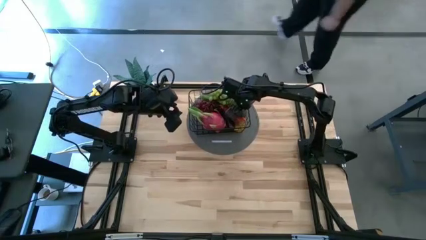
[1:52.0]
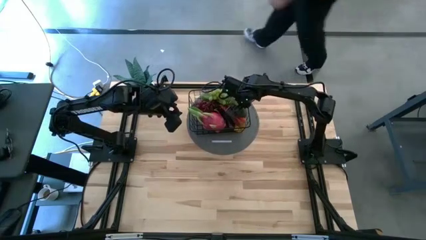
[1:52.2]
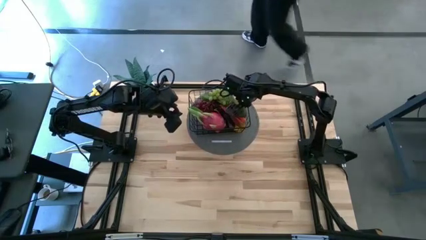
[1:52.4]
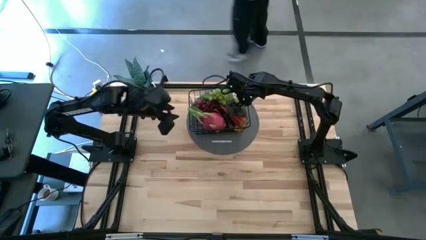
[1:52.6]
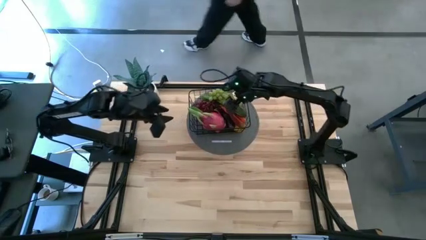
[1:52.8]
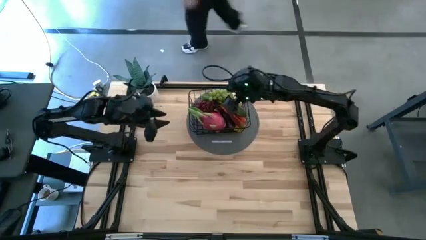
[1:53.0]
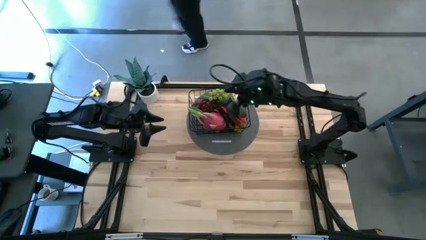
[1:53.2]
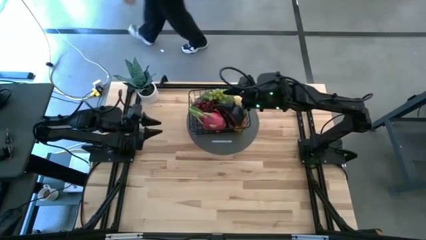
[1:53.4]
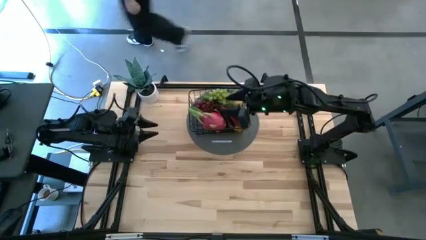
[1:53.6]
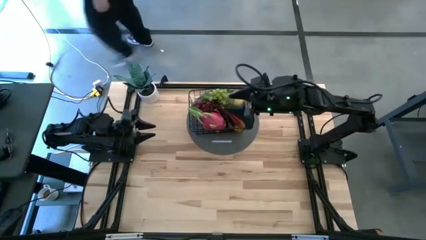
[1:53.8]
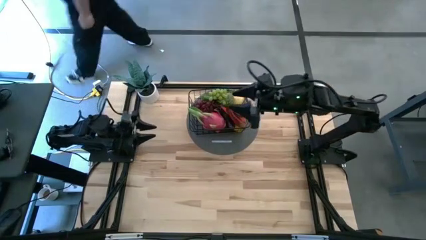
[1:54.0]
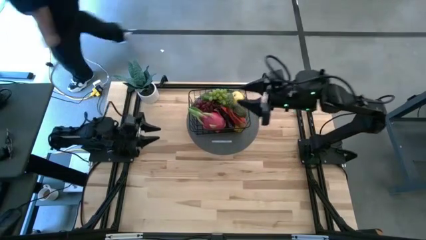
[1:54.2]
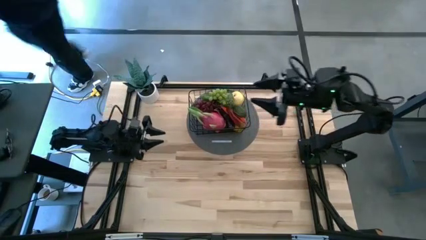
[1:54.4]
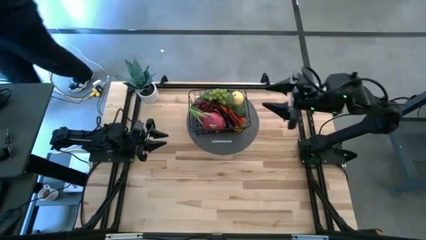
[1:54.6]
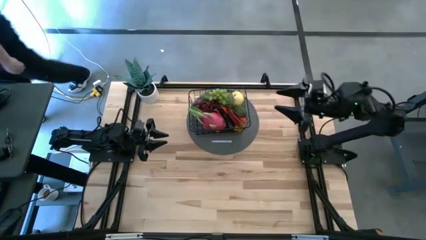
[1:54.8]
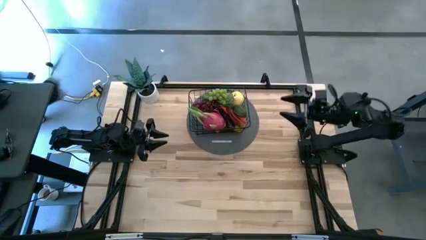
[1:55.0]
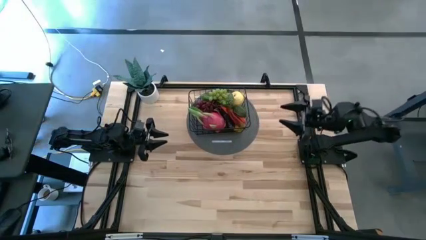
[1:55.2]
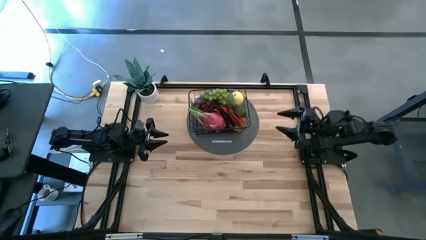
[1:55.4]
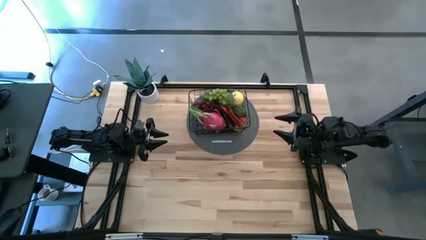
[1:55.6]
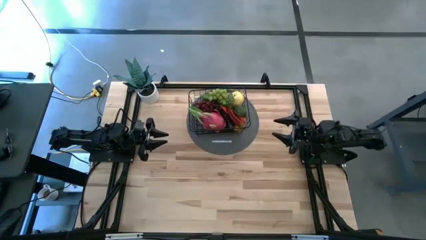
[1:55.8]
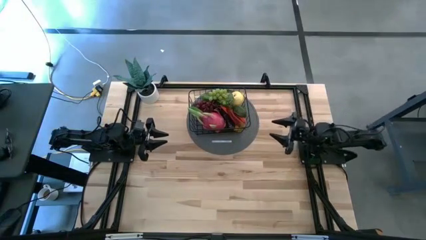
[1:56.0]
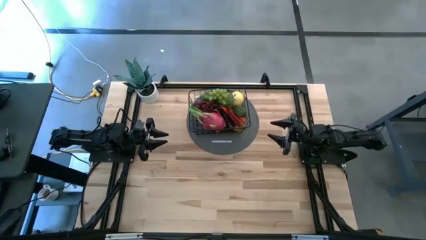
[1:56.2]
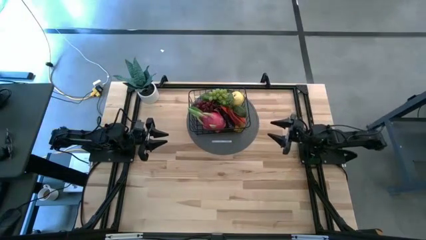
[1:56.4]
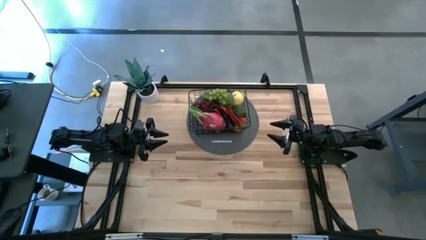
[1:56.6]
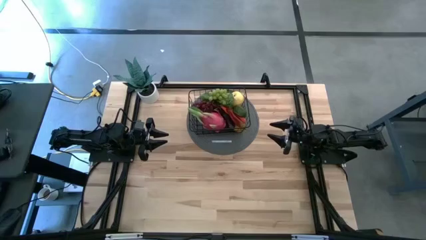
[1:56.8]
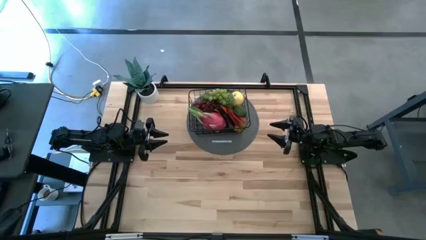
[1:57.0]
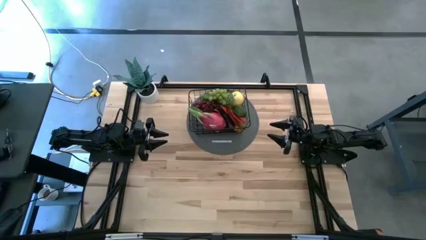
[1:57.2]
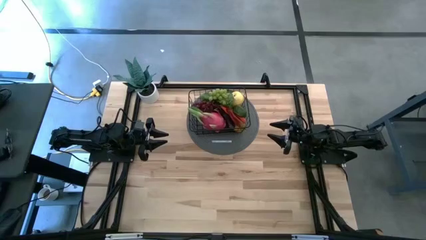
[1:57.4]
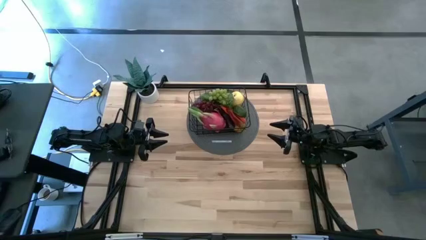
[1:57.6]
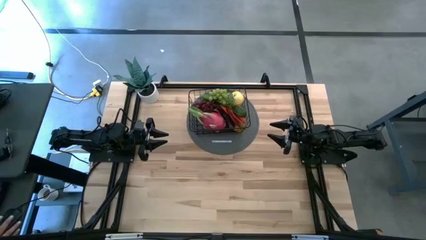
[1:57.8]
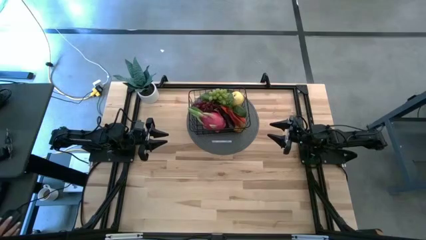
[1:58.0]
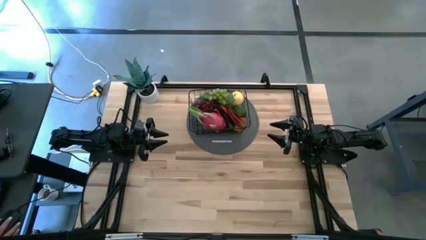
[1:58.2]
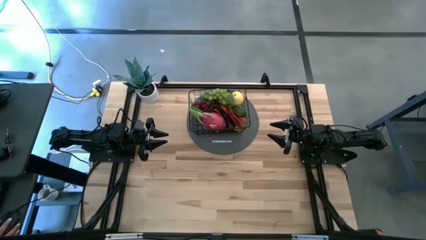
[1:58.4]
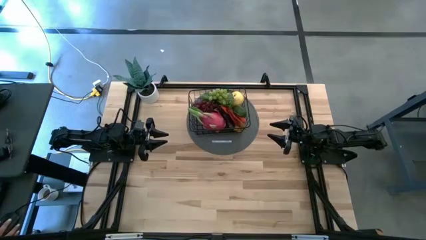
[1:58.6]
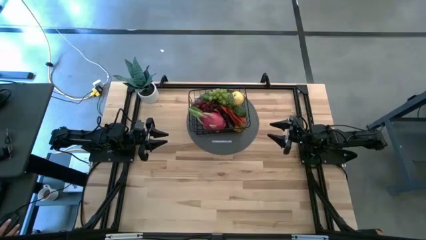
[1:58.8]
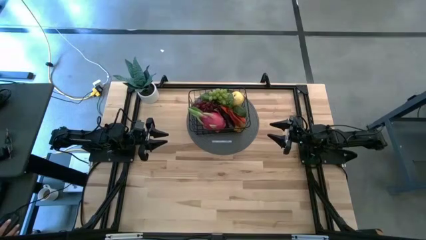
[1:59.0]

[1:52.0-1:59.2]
Task: Build produce basket
Return to Home Position

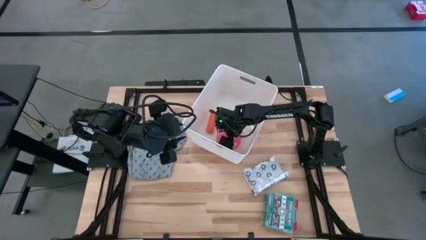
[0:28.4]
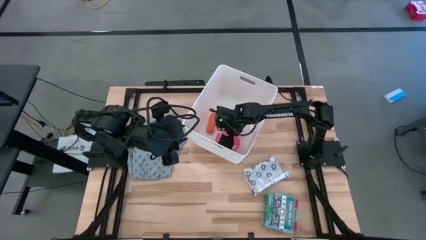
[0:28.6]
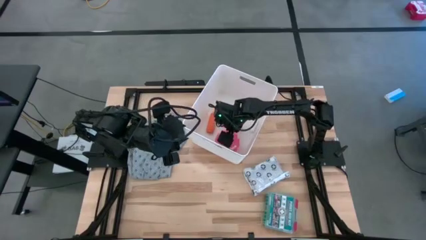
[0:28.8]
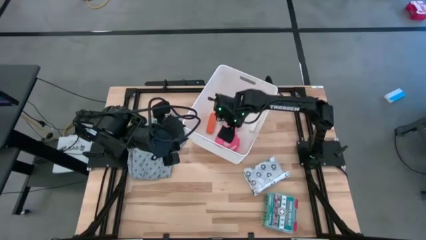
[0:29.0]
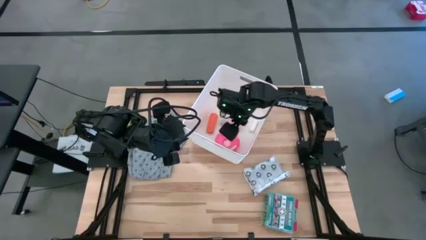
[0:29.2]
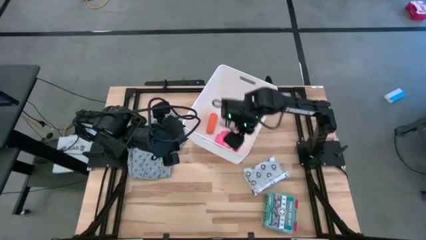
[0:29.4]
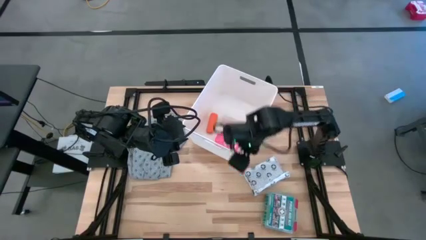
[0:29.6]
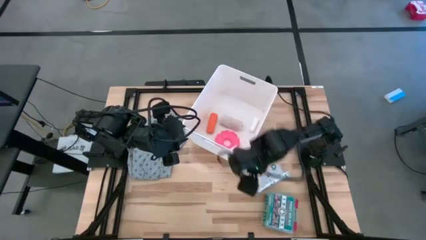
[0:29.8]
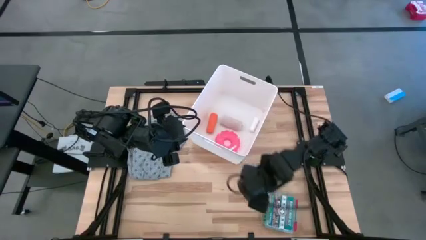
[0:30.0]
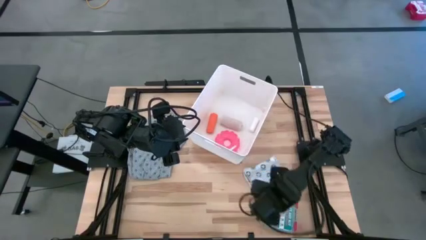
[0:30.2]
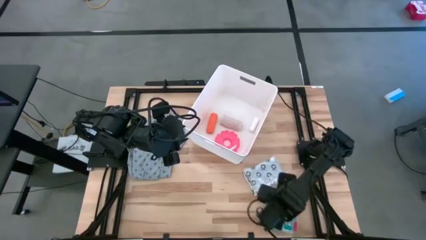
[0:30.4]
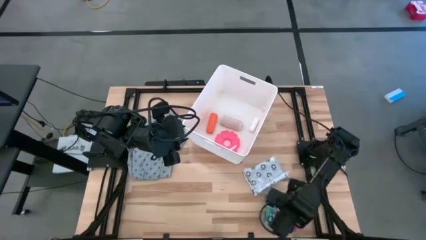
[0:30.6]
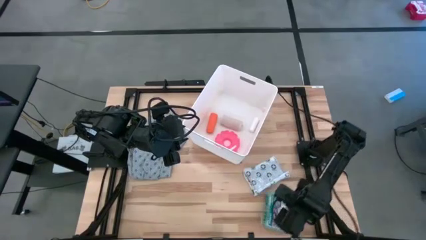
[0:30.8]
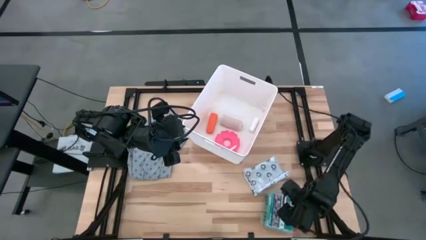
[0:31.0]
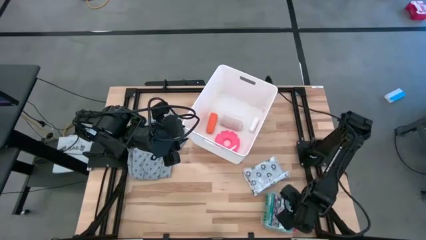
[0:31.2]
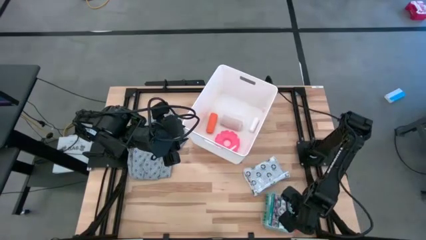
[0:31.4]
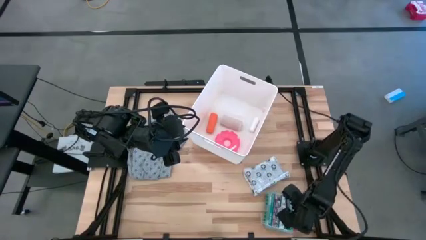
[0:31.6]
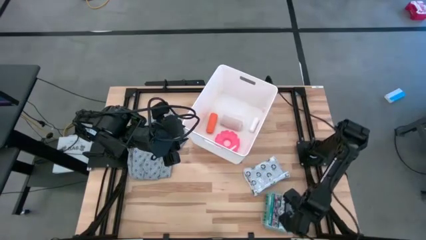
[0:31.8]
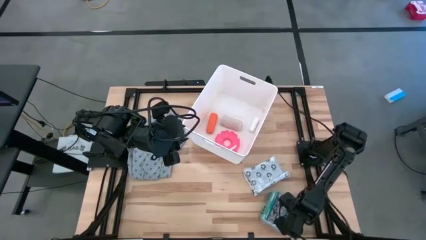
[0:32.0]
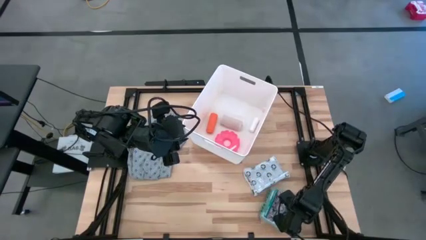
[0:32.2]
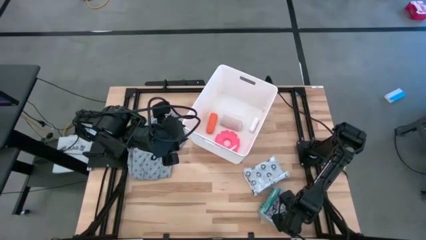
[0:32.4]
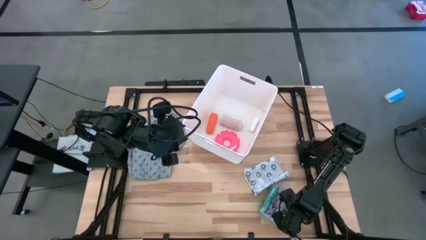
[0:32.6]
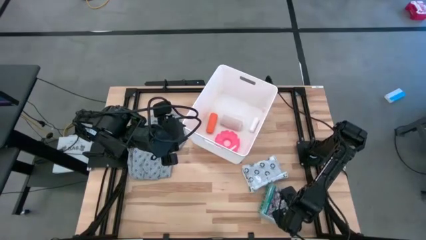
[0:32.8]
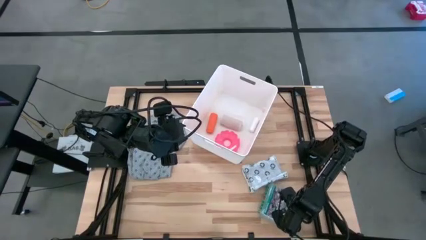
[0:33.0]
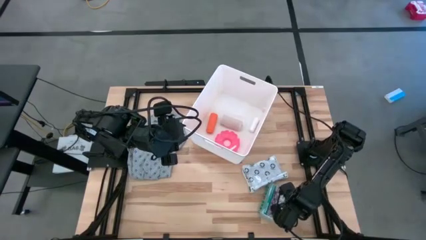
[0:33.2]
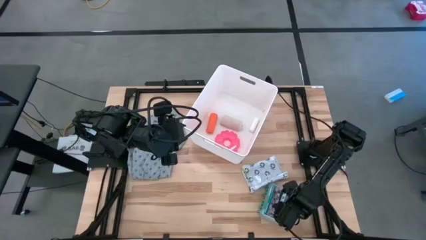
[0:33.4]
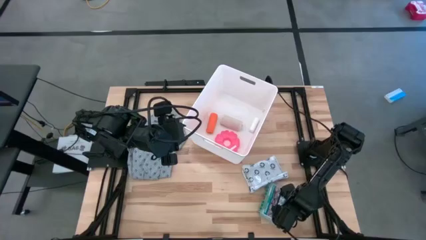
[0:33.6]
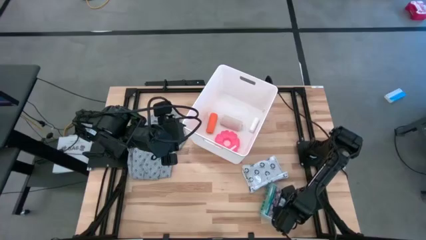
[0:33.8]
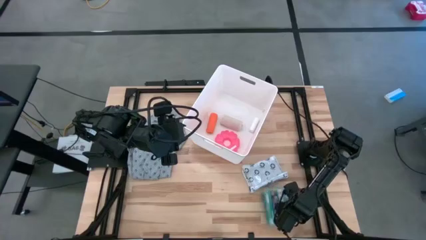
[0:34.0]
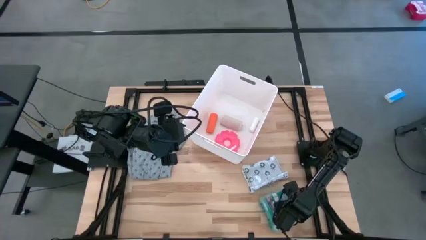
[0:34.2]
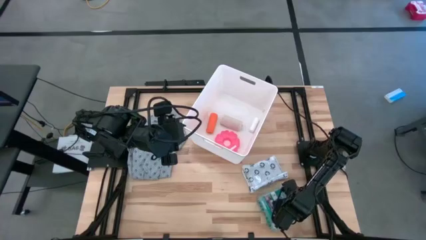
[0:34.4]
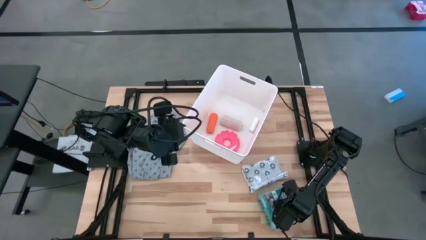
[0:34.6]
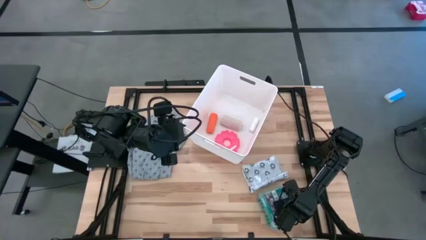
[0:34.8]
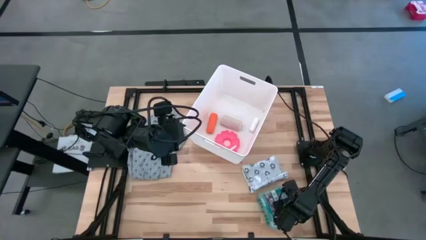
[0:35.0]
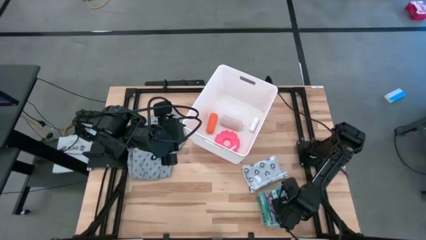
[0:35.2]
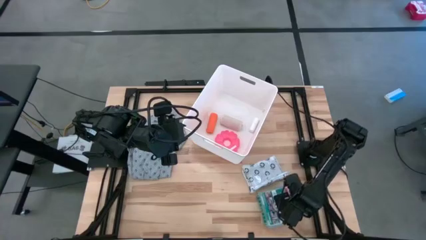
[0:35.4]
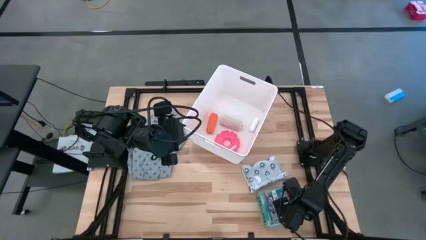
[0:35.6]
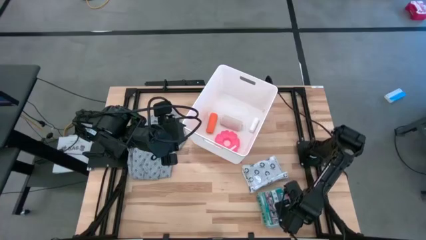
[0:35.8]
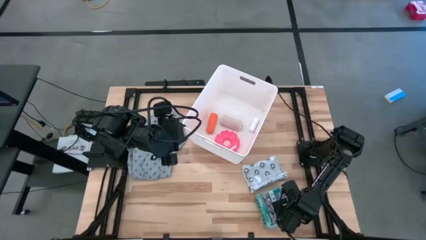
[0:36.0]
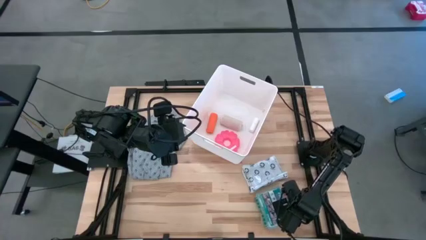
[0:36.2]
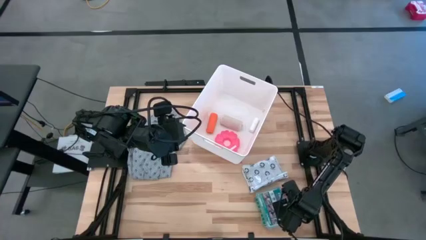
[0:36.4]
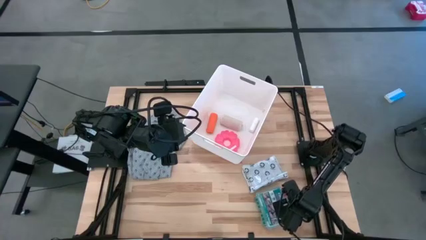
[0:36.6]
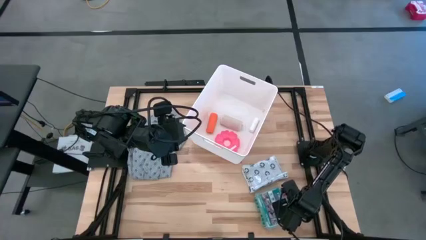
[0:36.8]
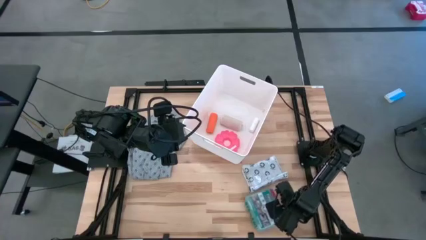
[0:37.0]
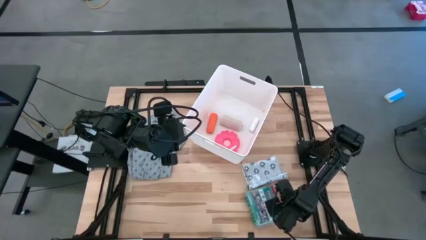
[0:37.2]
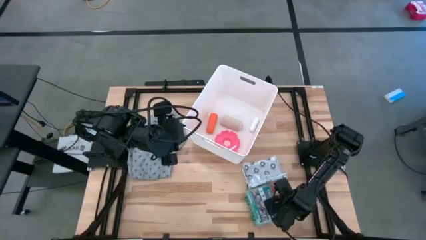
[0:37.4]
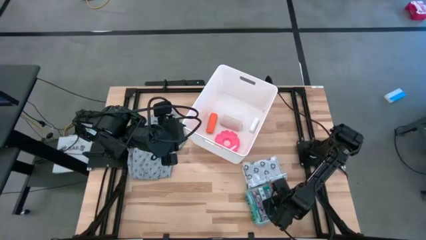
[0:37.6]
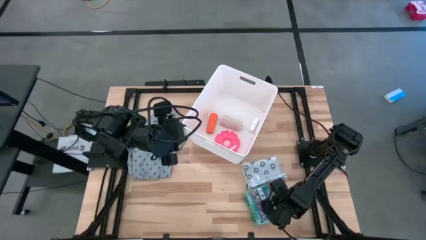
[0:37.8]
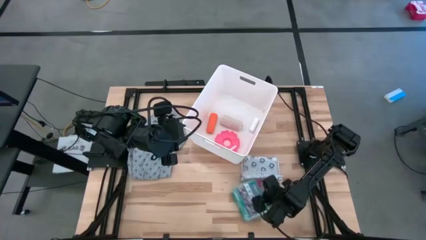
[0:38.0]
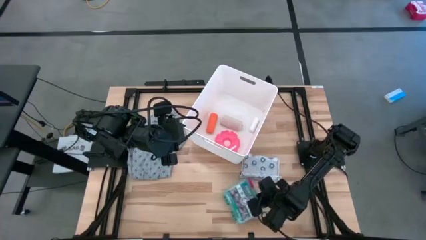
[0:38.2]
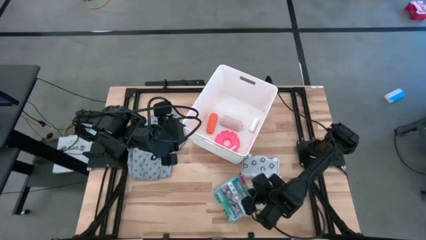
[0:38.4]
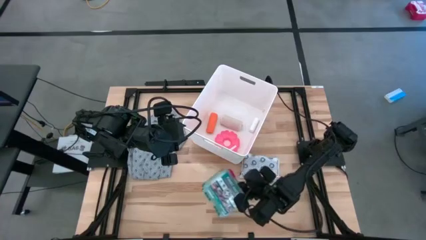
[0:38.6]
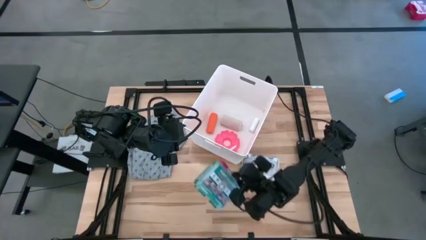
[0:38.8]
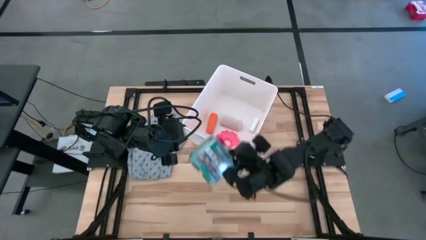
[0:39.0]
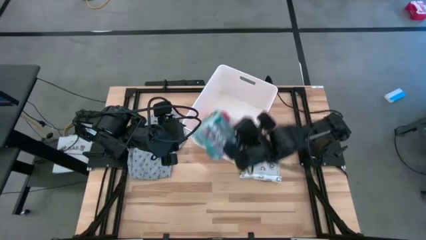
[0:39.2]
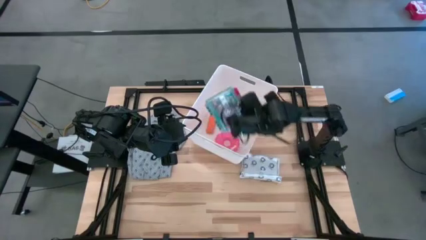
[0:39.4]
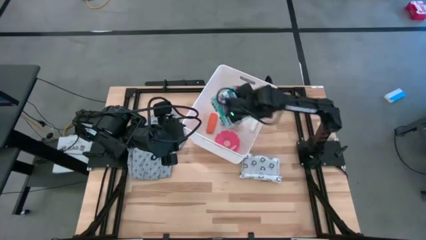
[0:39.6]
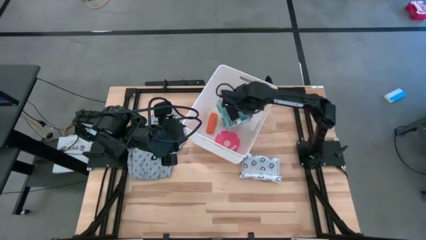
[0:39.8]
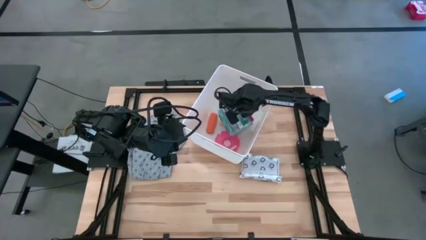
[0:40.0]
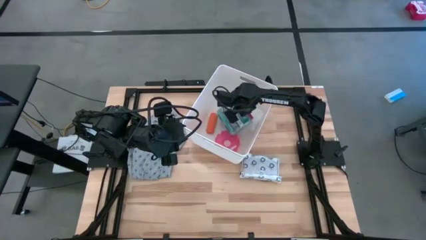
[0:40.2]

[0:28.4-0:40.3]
Task: Pick & place medical supplies in basket/bin
Put the green first aid kit into the white bin
